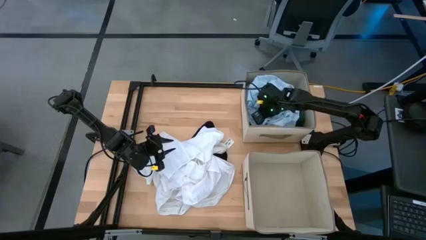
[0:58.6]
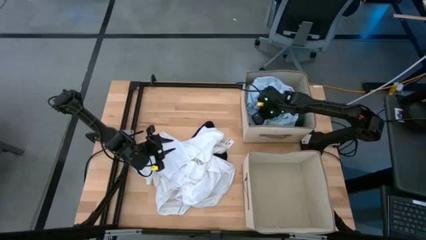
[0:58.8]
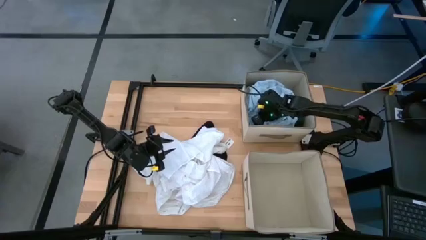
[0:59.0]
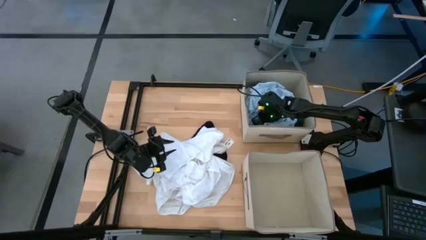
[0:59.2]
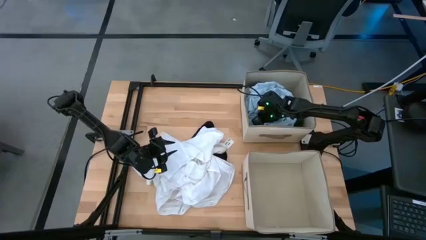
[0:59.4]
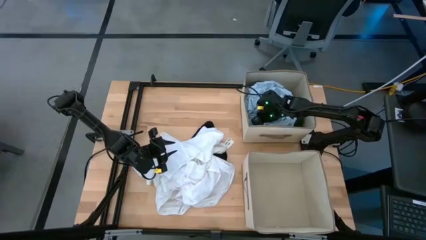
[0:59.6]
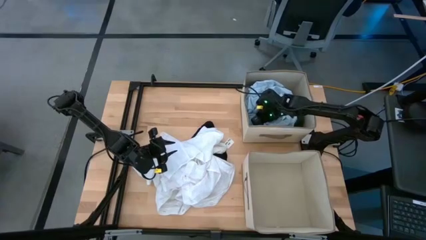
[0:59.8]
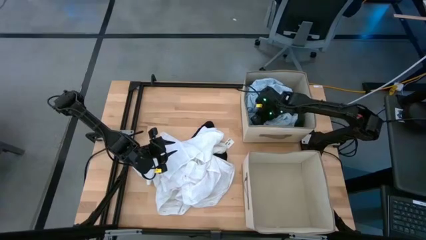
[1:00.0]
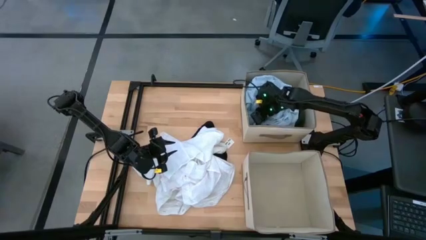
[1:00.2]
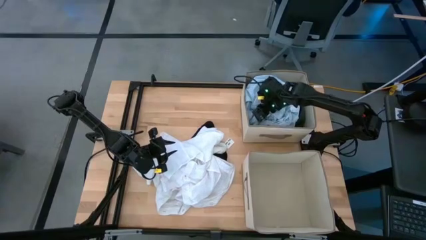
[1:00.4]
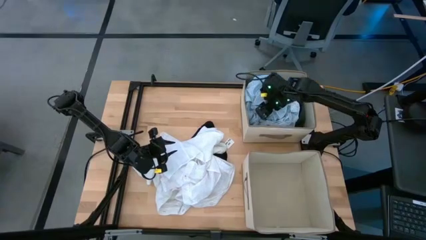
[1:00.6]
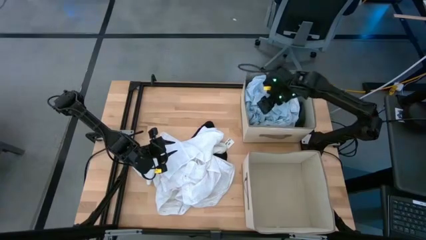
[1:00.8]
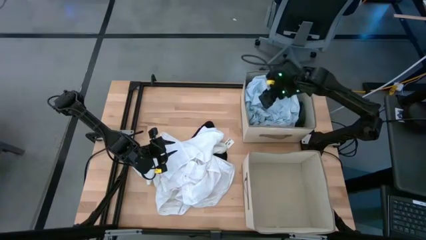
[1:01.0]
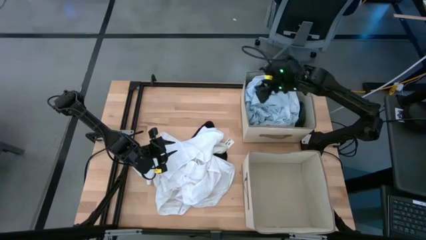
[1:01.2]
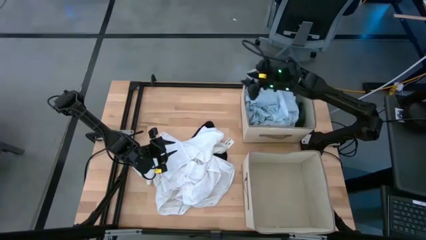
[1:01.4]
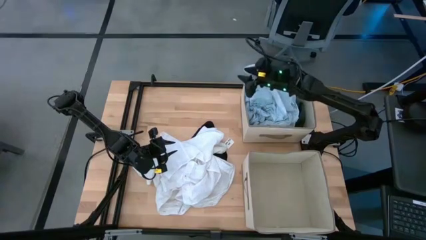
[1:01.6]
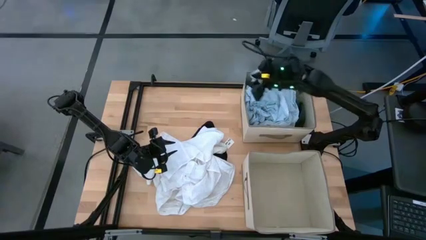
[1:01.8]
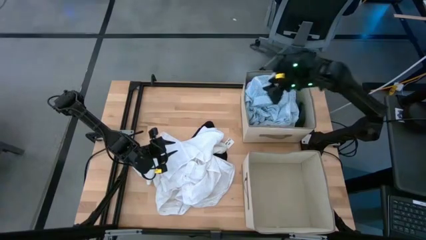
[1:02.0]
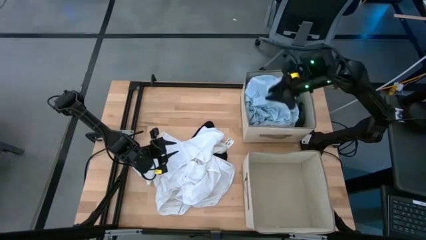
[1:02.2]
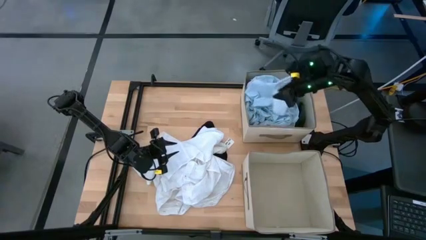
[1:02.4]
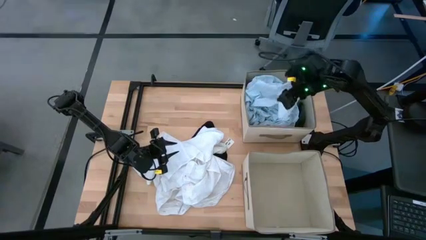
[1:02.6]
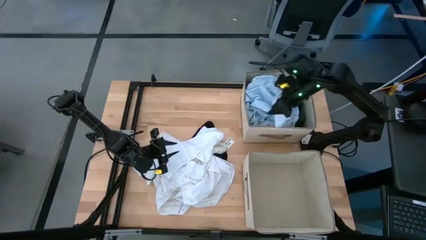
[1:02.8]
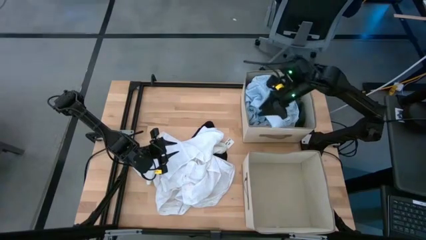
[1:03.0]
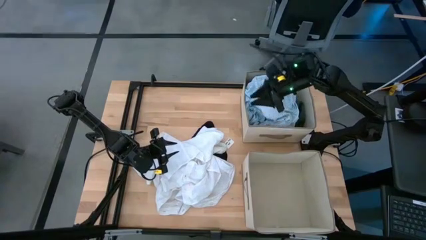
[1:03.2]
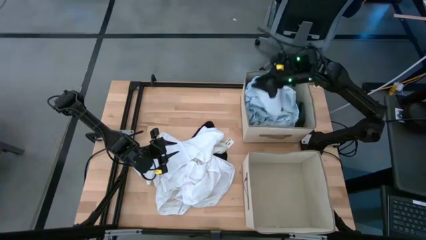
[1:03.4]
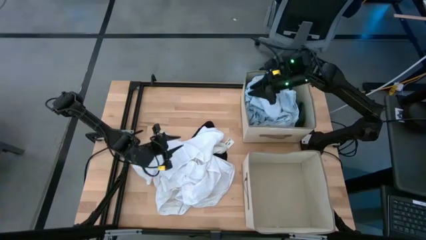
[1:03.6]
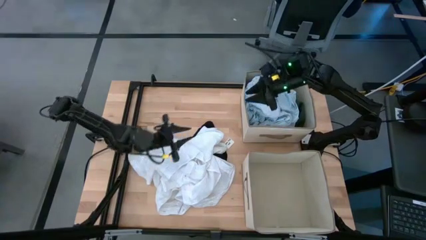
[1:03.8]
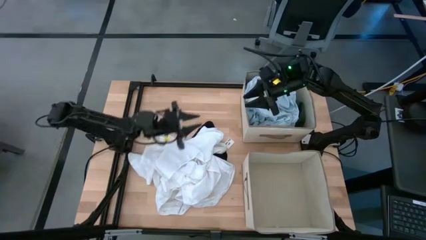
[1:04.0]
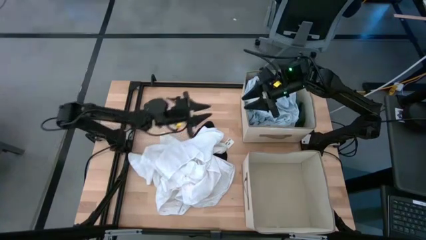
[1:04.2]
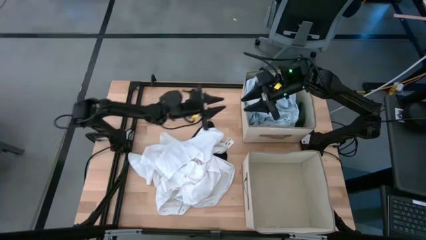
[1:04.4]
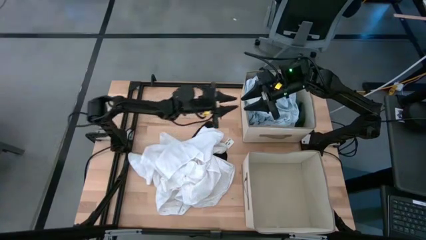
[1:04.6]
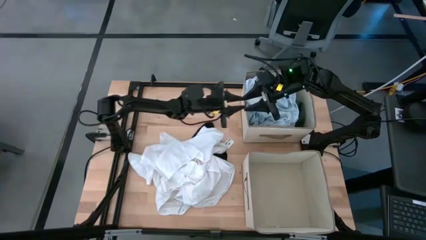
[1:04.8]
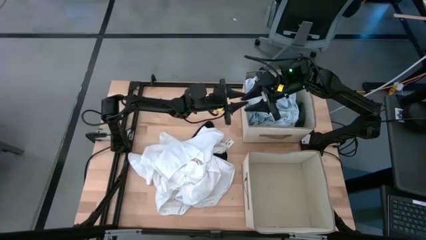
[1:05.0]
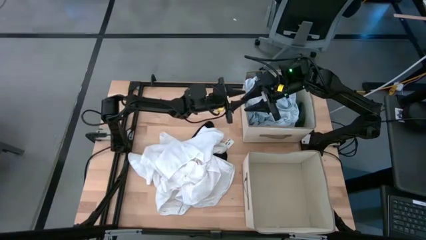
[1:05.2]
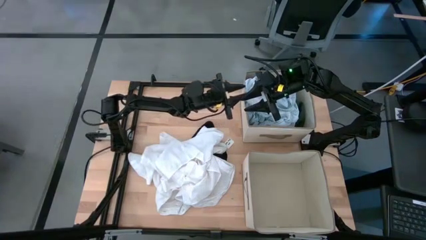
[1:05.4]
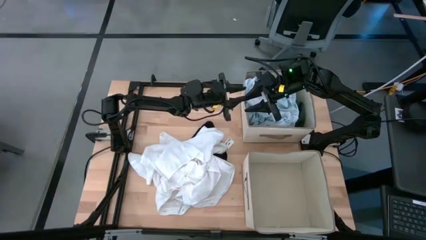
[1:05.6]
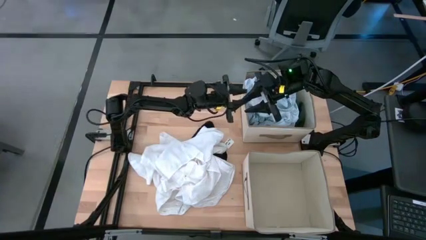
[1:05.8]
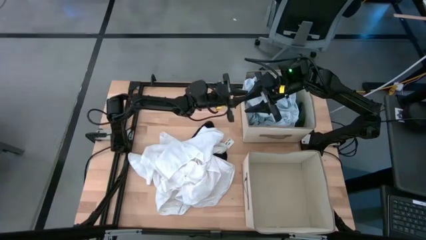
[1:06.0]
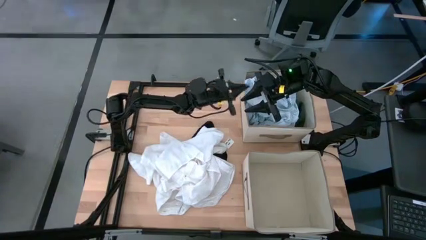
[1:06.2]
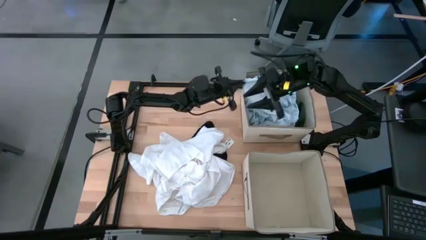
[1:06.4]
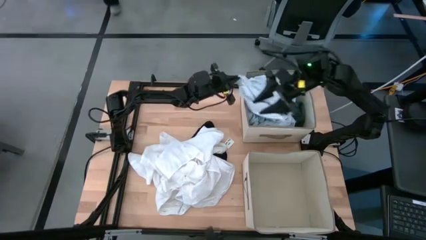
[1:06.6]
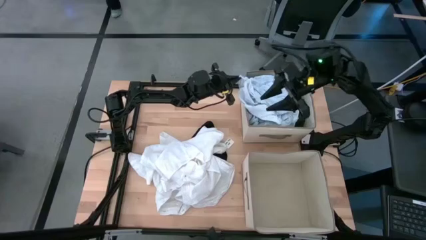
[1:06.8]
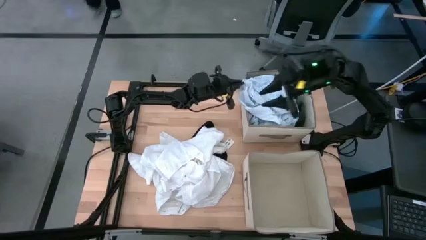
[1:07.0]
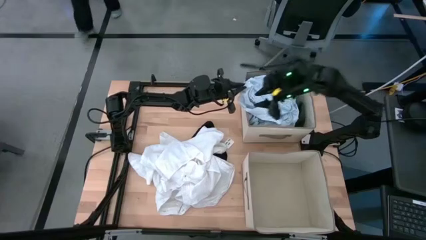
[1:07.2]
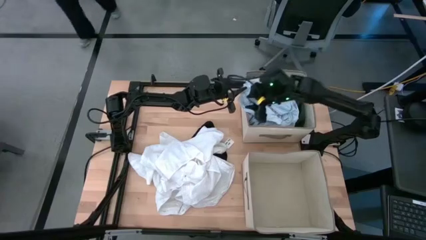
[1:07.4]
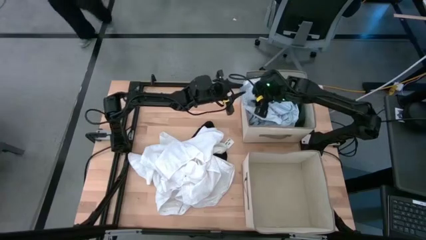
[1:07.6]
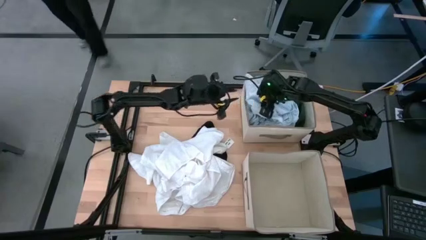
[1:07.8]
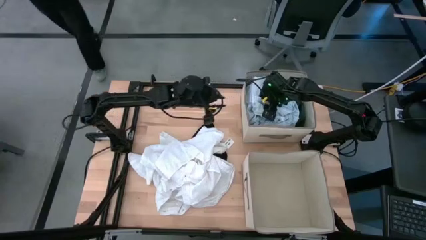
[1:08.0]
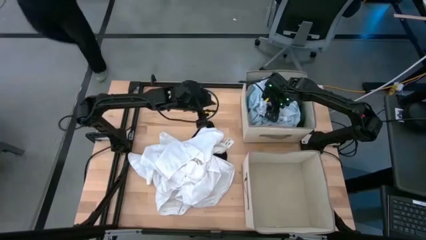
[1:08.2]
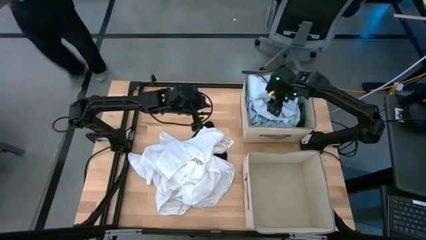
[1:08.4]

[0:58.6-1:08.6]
Task: Sort clothes
Put the patterned polo into the top bin

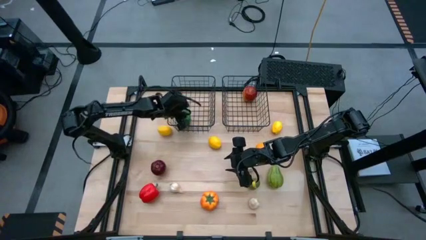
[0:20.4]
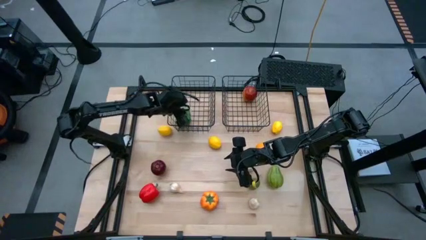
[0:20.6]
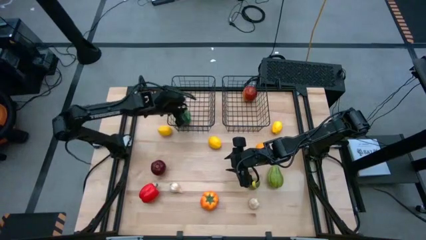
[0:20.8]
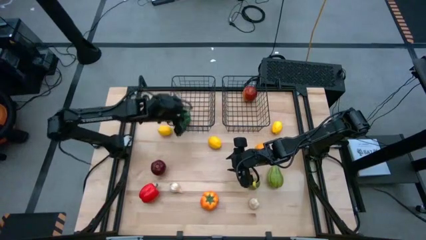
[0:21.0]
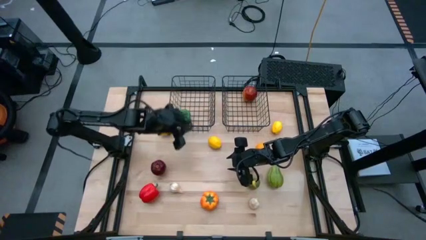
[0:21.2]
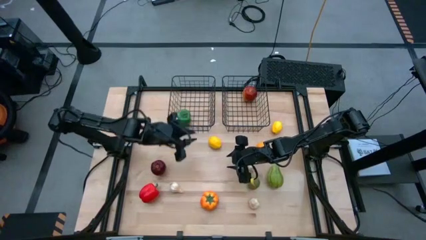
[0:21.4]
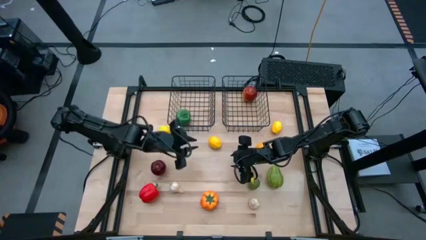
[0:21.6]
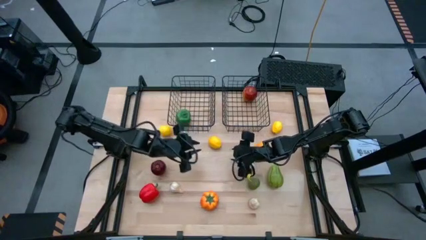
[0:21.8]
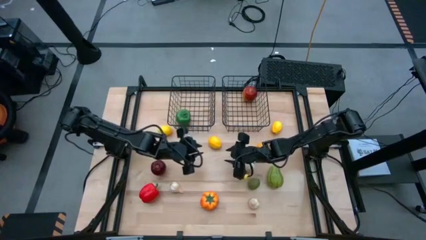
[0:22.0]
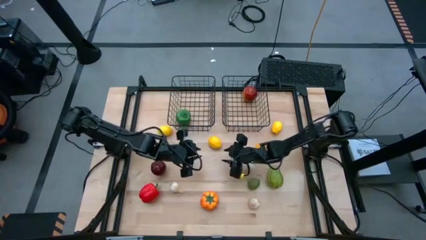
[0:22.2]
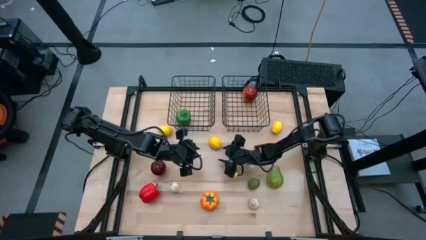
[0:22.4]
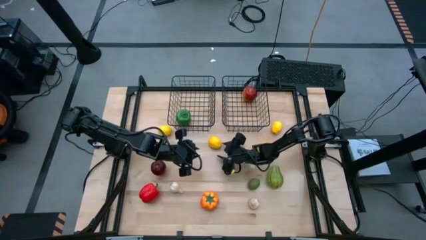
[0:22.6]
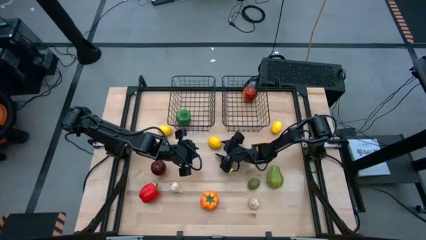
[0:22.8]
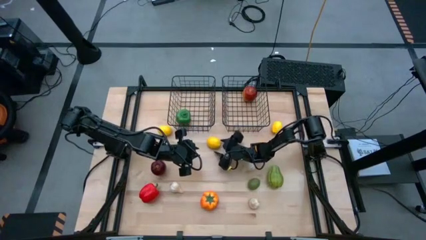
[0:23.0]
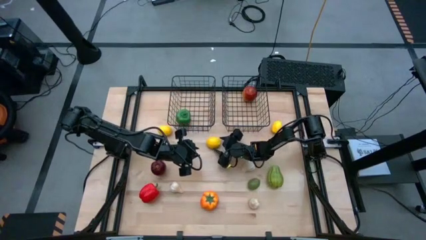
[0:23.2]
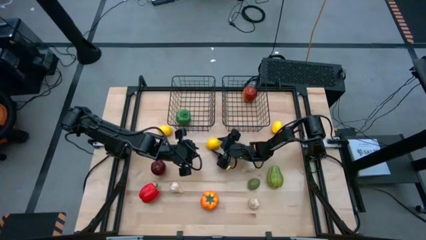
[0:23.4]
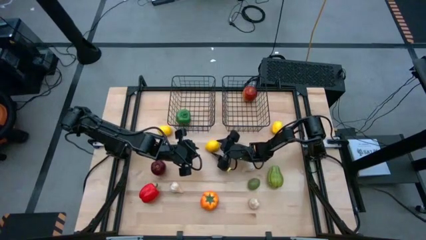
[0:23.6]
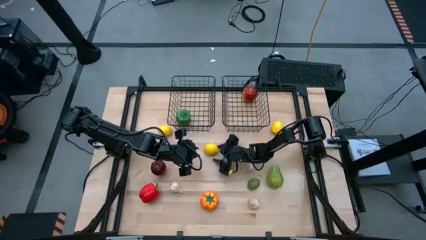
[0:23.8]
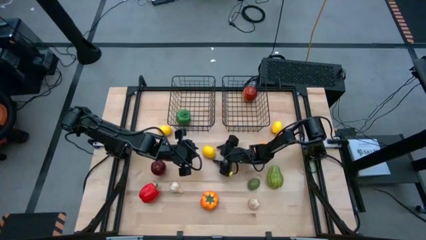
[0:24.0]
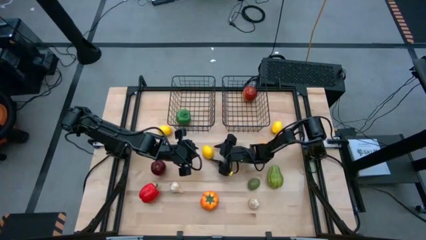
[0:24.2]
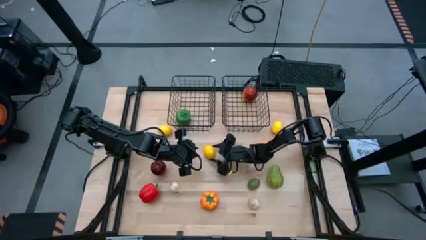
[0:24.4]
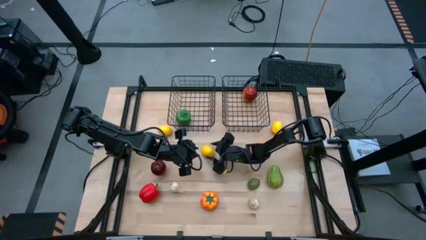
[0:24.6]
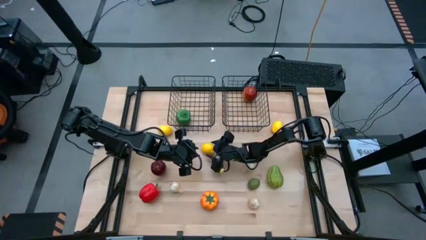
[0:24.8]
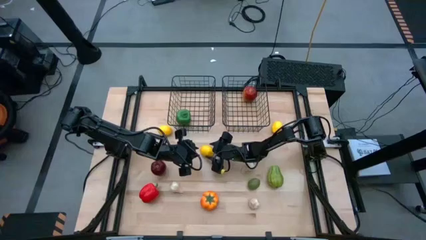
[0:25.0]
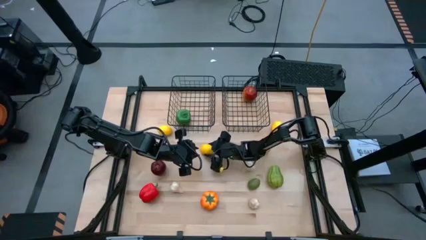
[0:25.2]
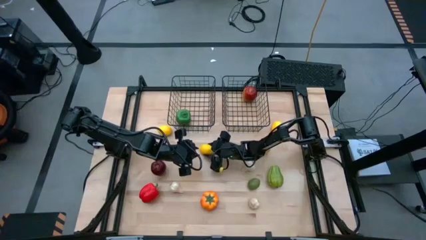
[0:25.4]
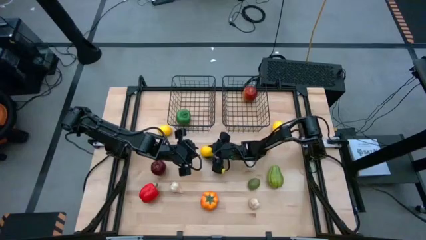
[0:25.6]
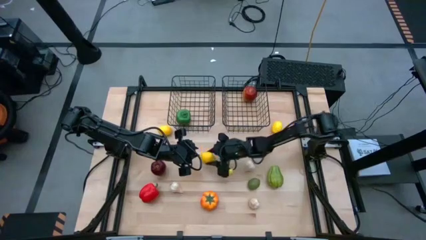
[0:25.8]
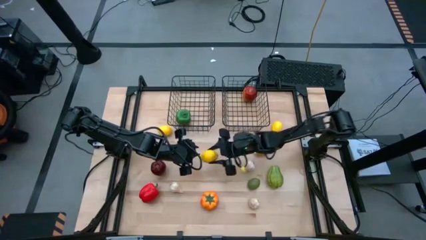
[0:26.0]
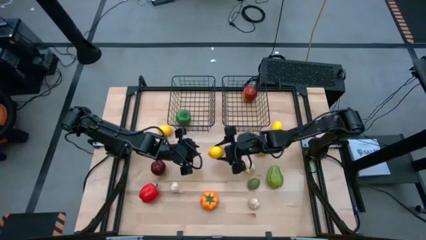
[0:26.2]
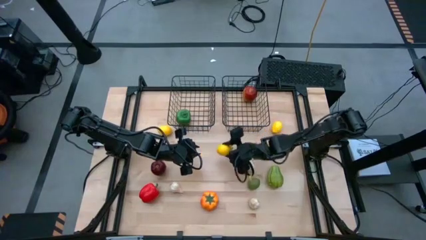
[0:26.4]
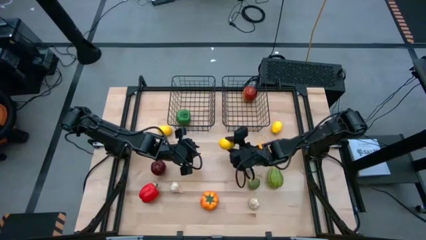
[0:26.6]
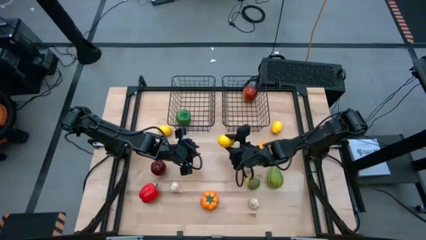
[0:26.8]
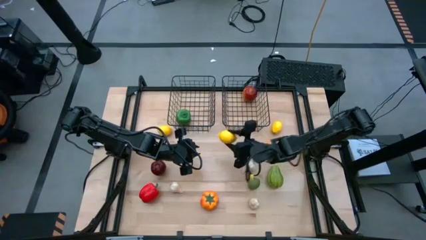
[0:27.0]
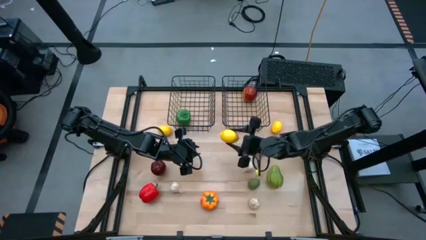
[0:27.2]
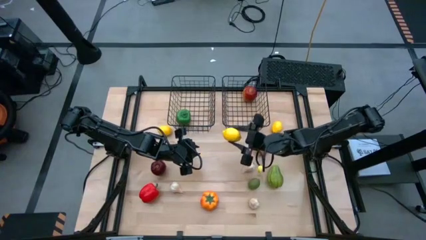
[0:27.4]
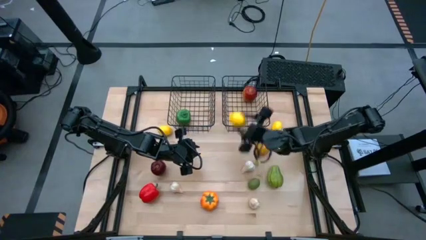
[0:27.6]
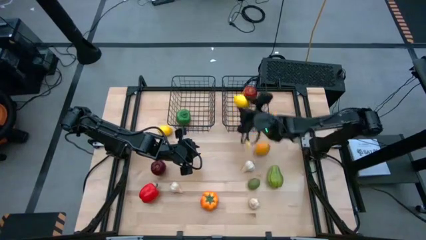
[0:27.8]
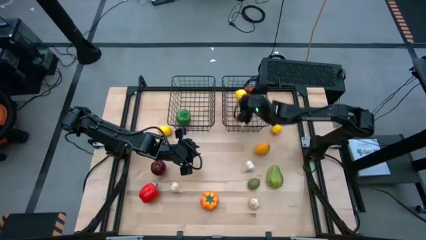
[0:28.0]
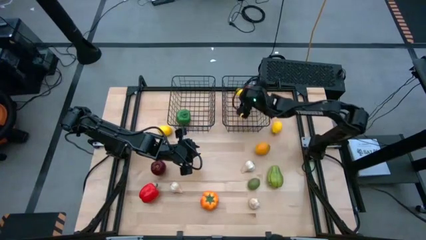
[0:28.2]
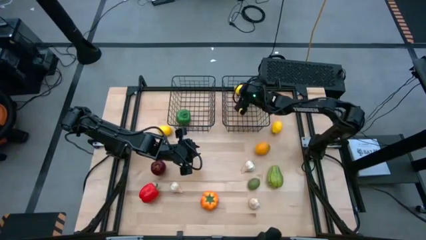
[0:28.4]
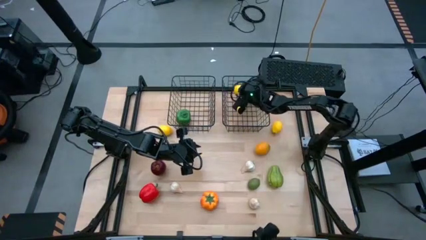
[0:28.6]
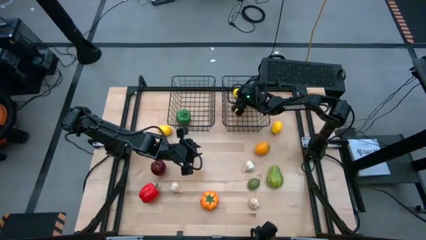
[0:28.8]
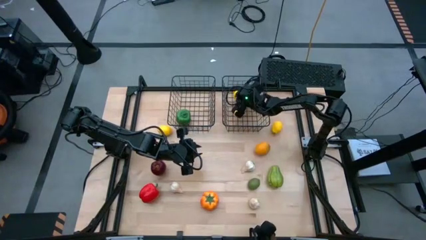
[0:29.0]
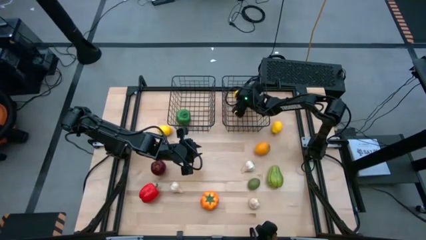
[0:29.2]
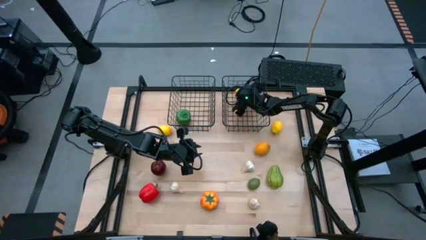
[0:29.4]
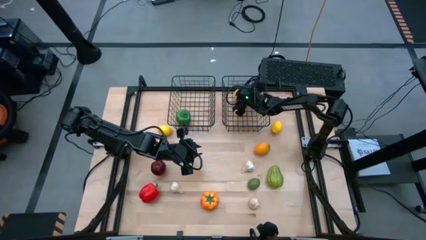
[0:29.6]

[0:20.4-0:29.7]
Task: Sort produce into baskets
Put the yellow lemon into the right wire basket
